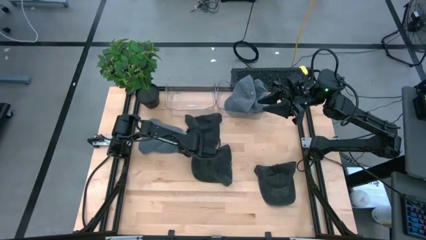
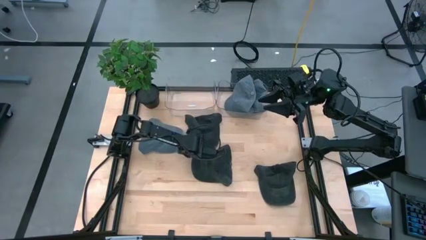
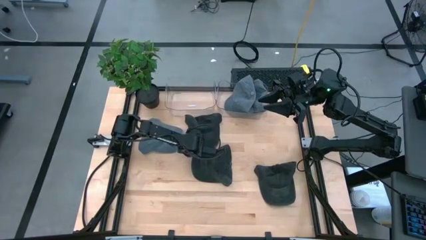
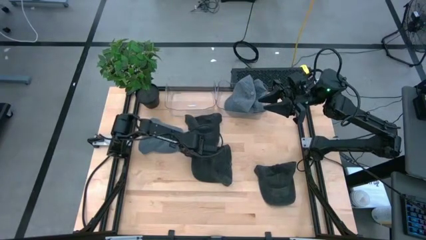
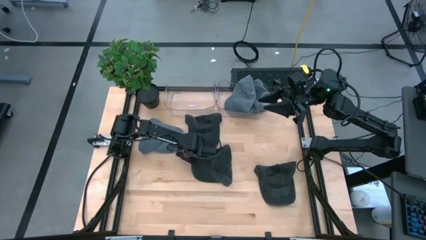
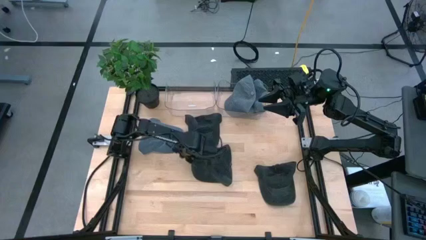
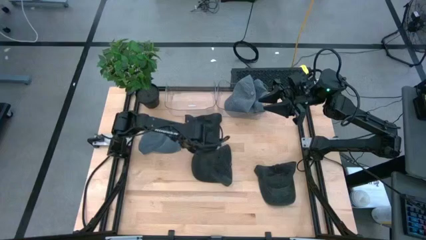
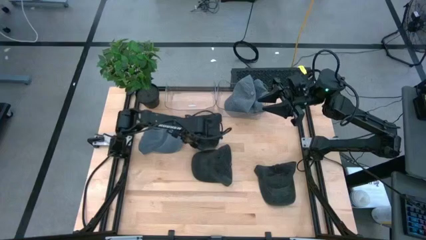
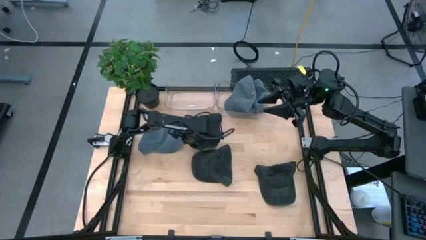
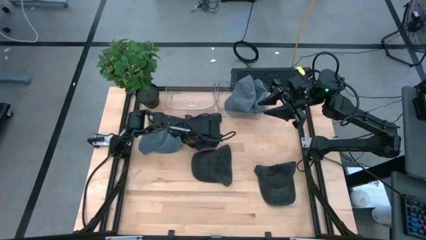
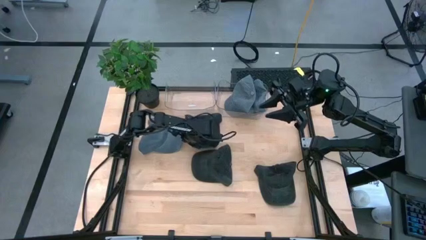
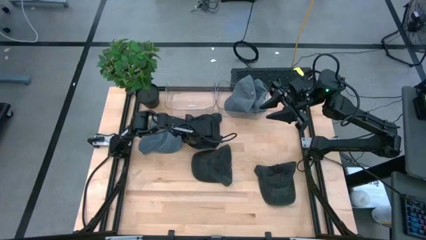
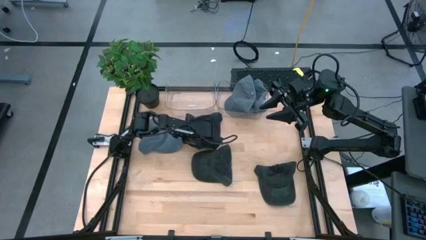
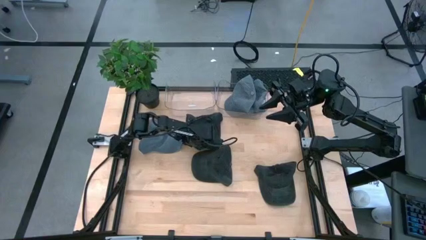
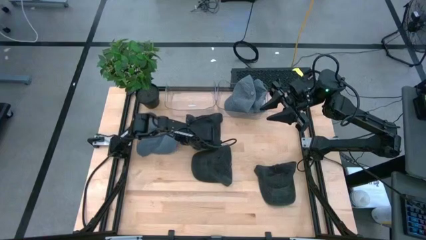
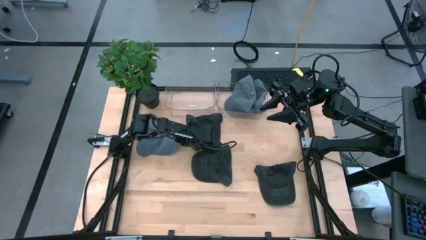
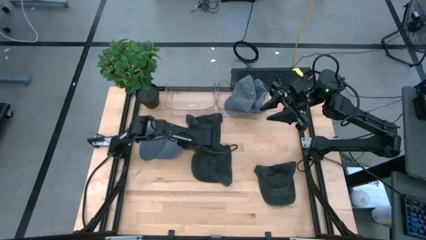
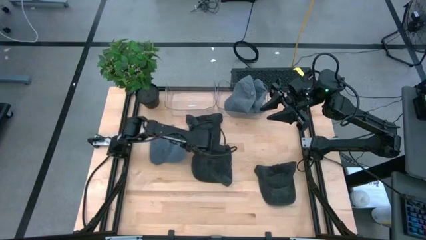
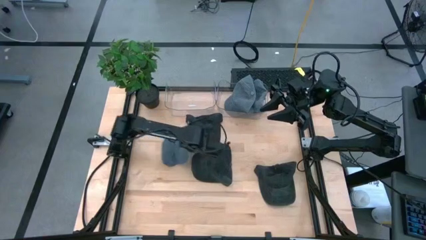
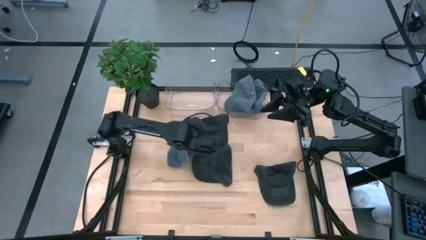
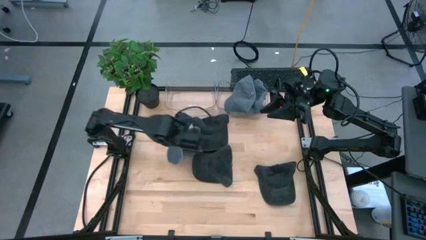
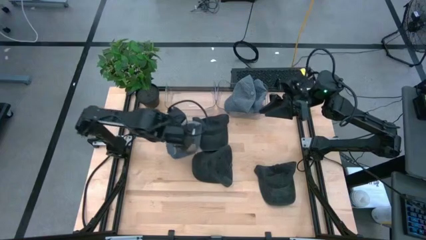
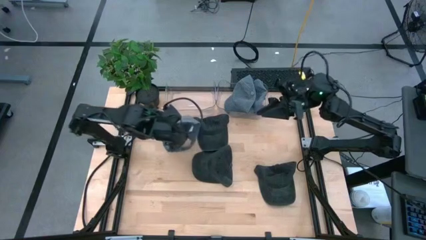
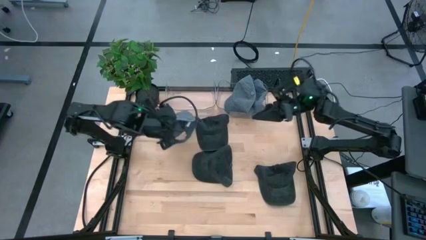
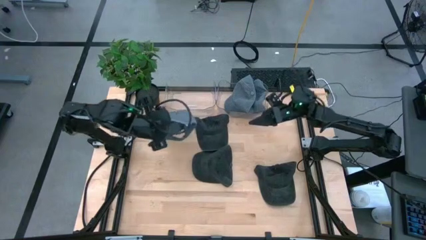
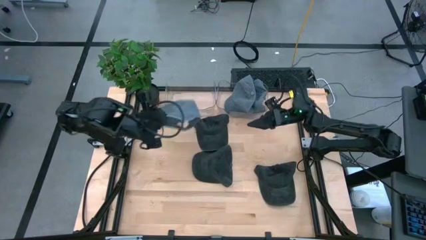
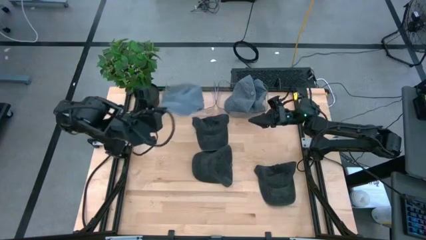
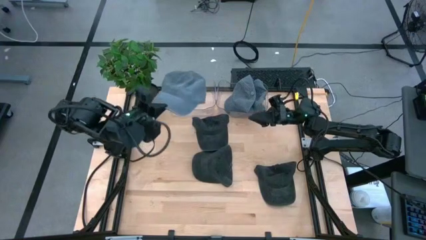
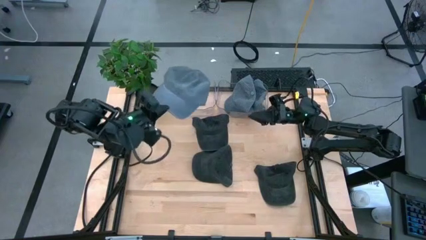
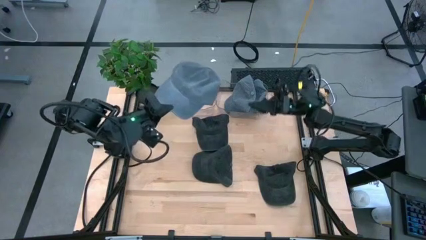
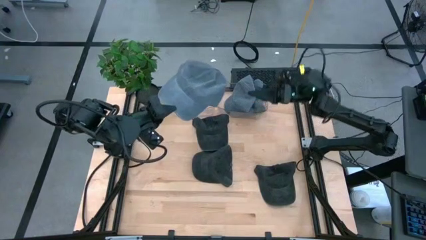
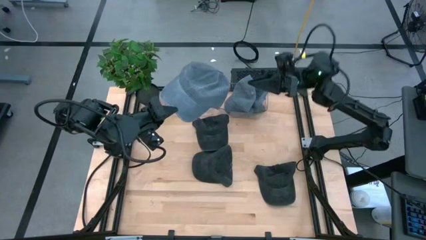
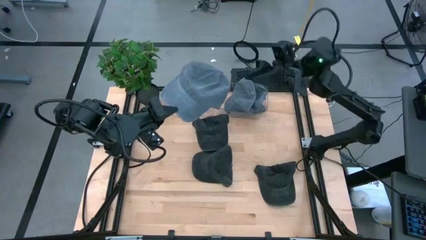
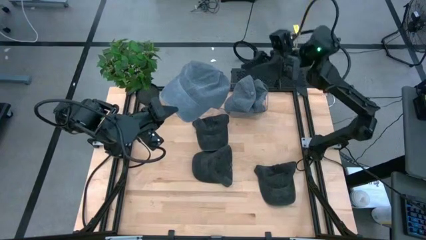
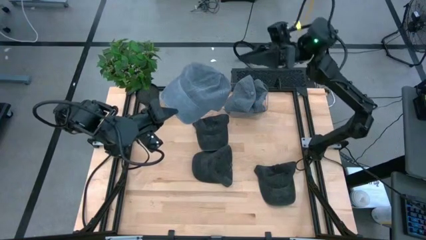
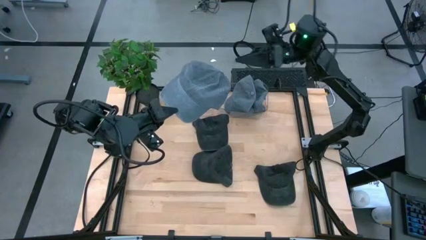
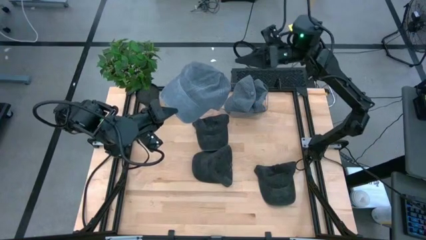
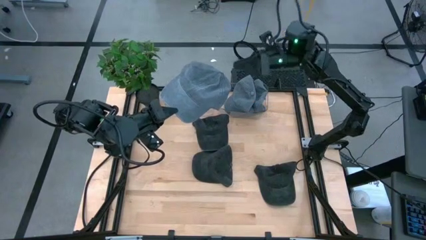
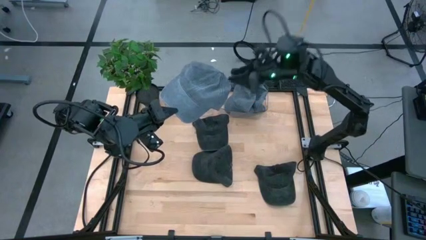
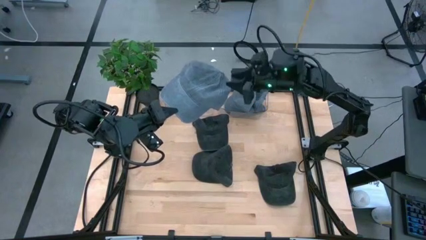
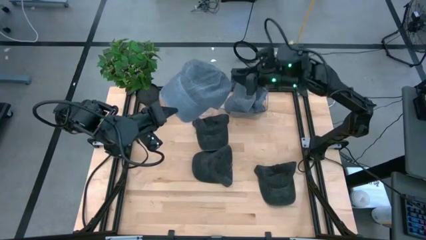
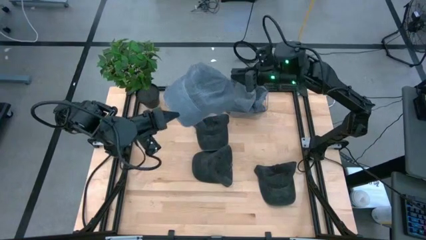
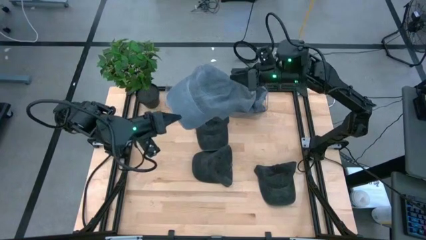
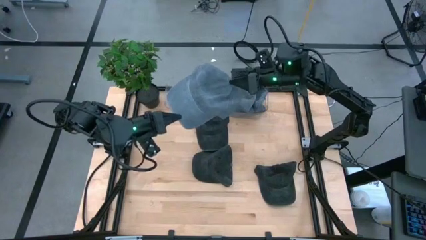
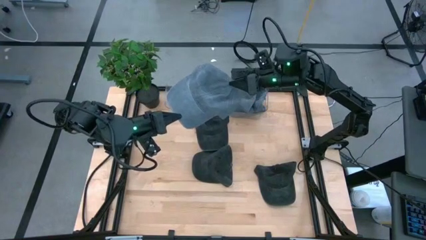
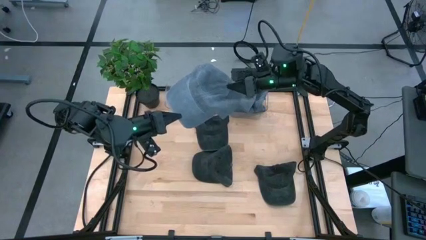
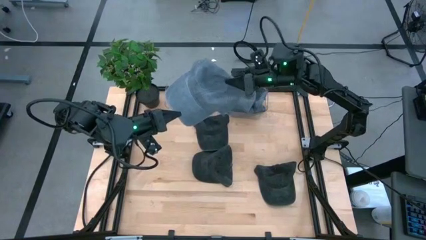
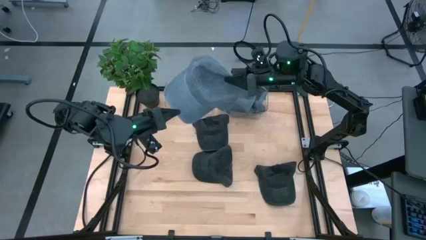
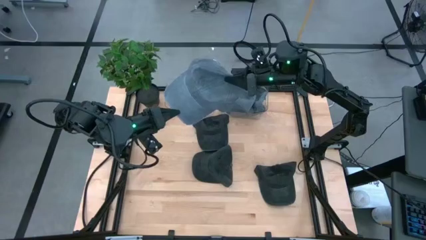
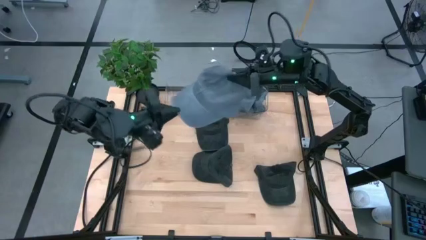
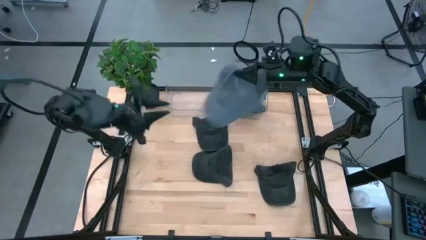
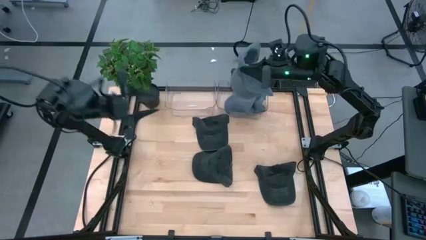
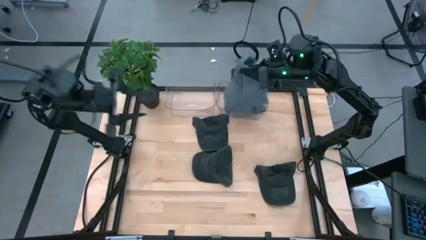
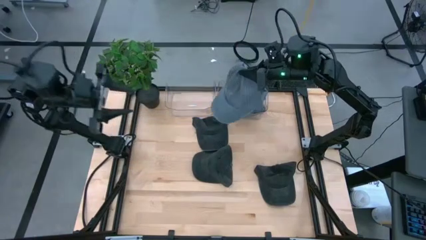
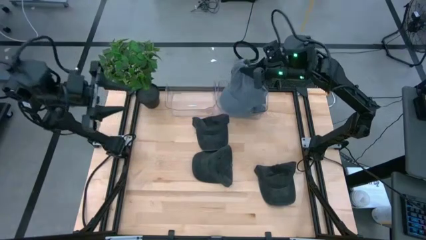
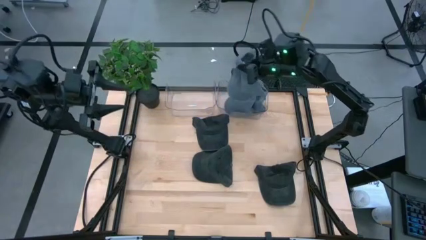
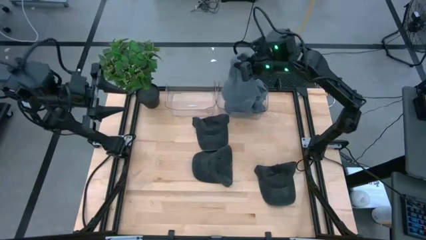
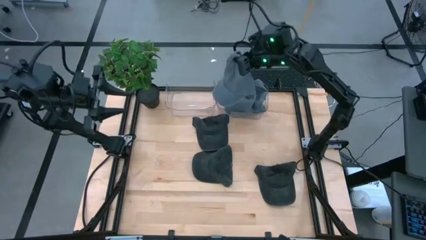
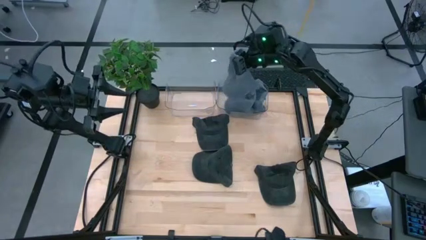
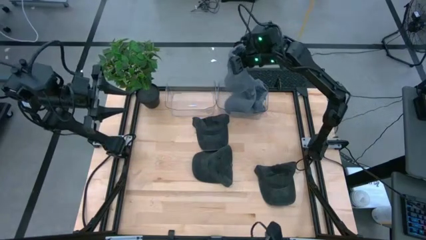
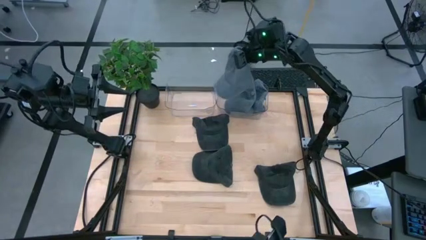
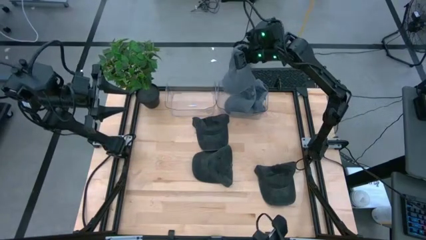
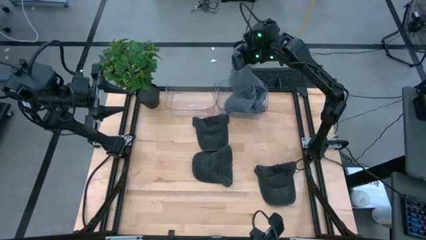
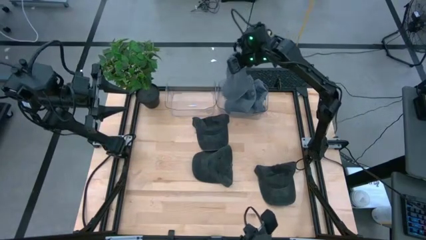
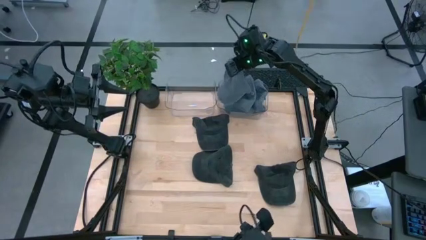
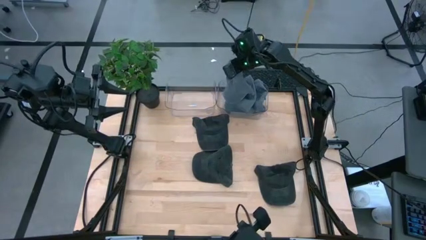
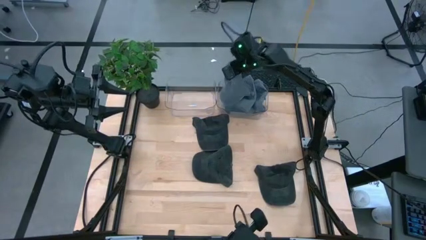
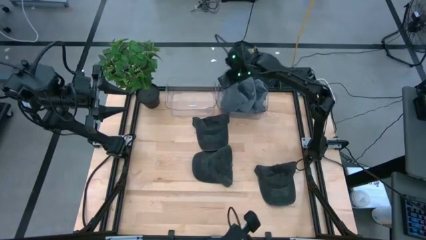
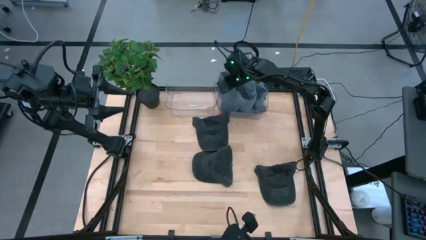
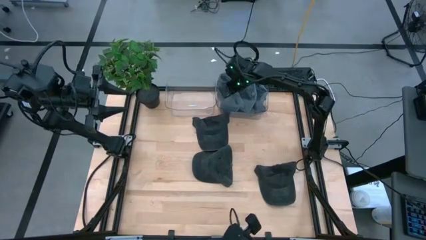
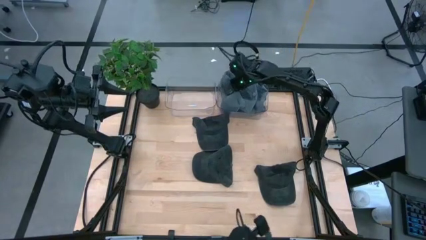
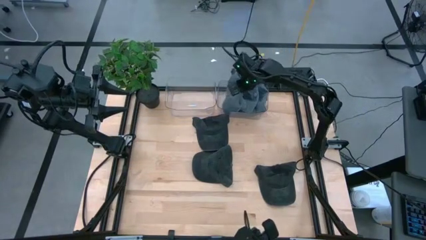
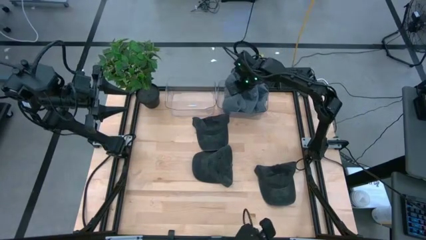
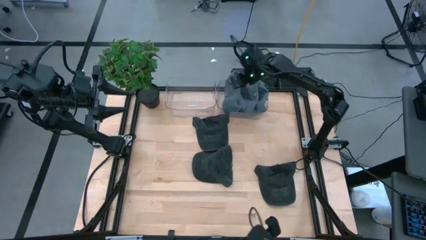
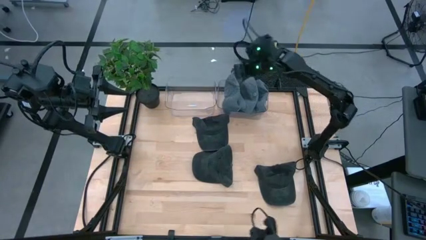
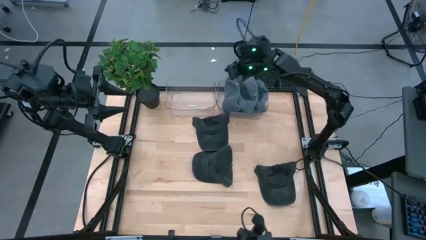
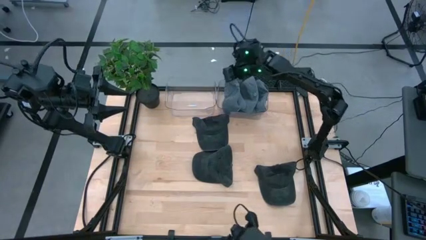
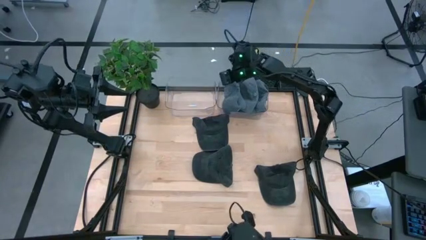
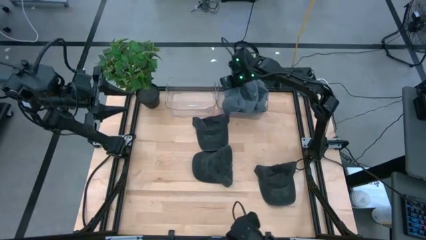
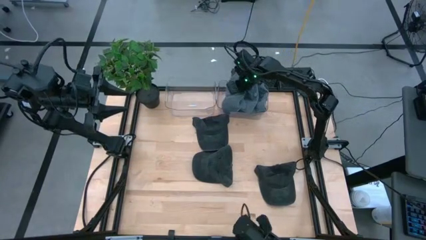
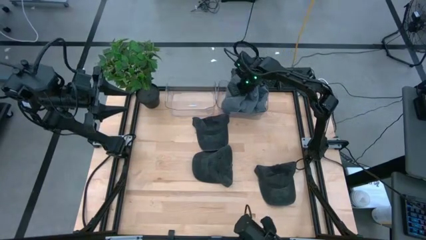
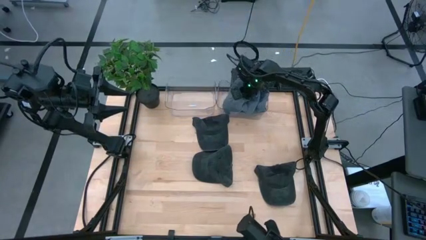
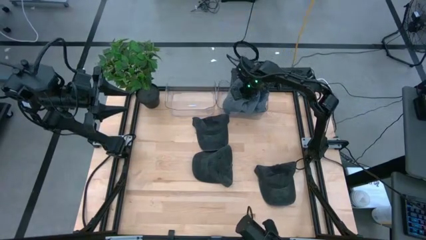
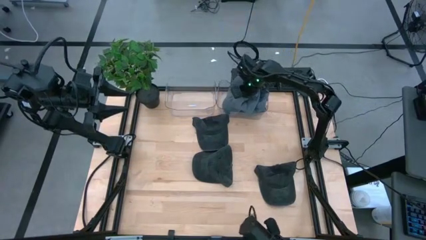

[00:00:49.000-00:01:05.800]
Task: Pick & Place hat
Put the blue cap into the right transparent bin
